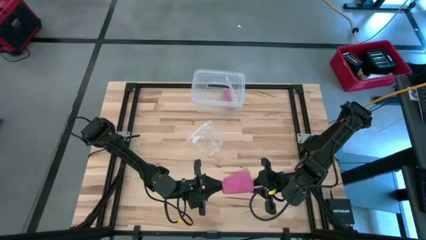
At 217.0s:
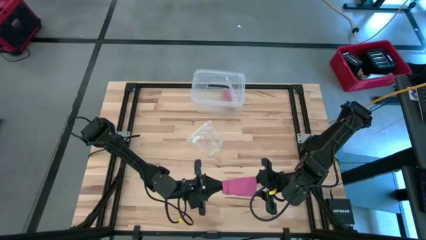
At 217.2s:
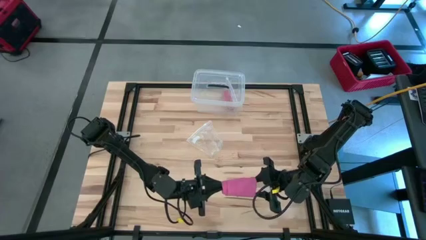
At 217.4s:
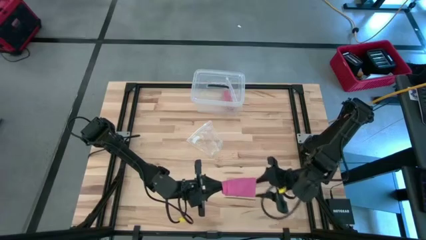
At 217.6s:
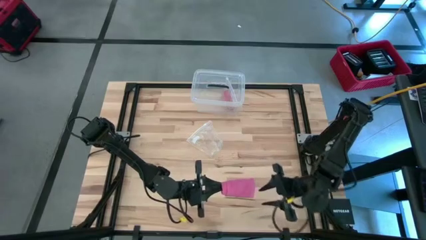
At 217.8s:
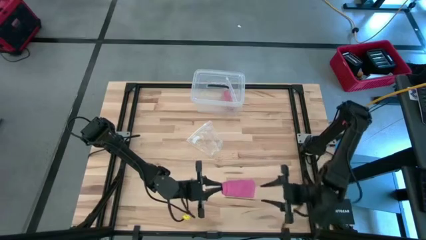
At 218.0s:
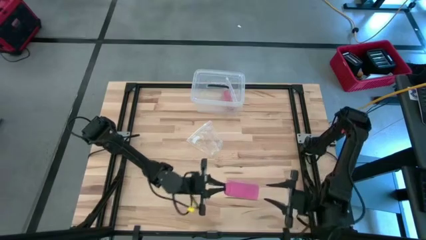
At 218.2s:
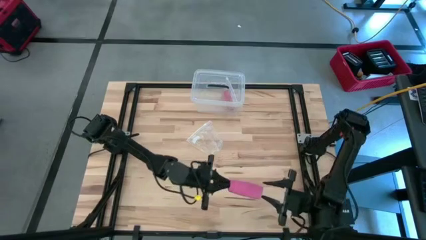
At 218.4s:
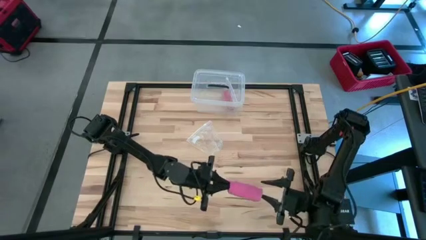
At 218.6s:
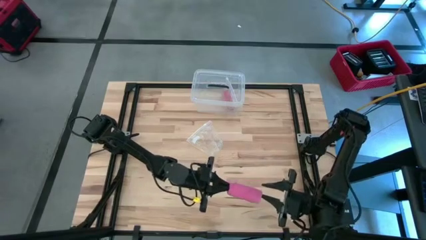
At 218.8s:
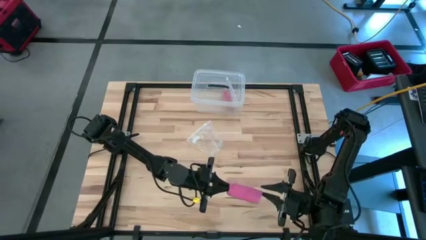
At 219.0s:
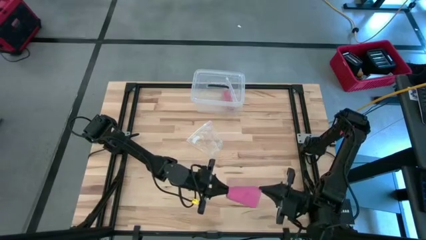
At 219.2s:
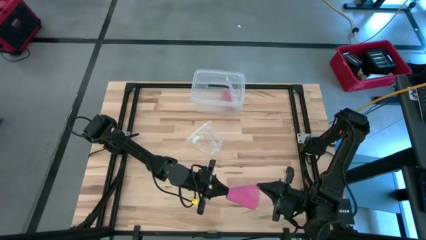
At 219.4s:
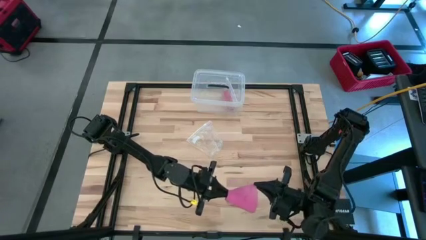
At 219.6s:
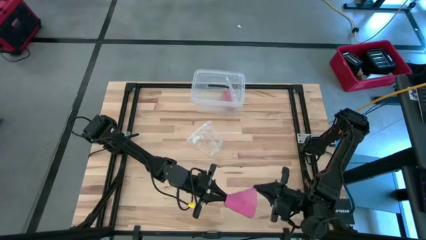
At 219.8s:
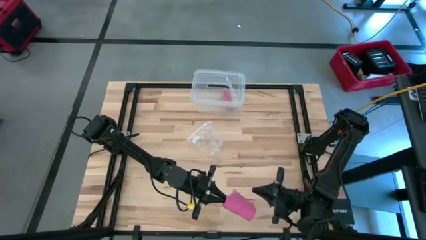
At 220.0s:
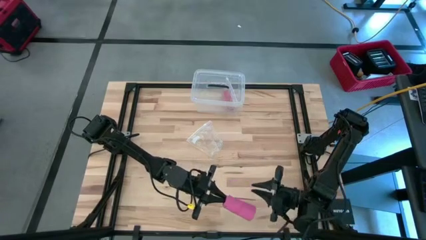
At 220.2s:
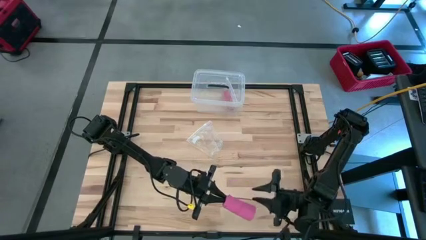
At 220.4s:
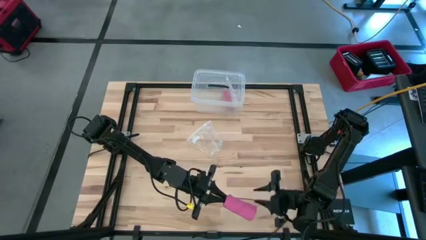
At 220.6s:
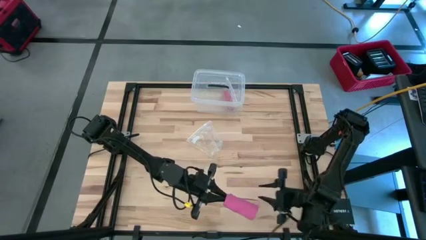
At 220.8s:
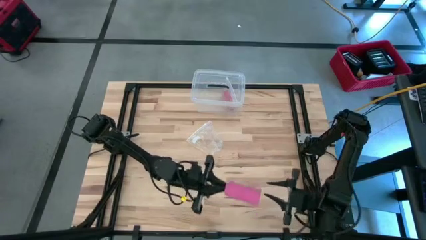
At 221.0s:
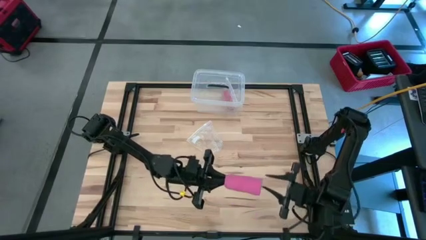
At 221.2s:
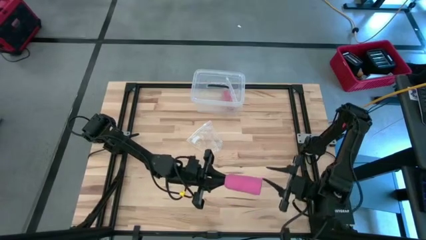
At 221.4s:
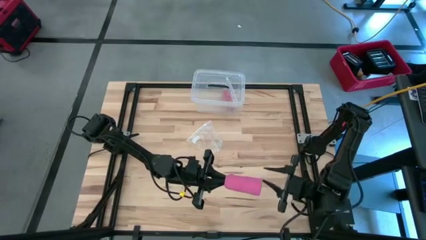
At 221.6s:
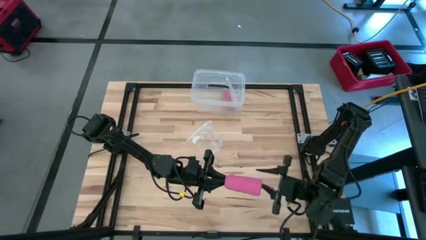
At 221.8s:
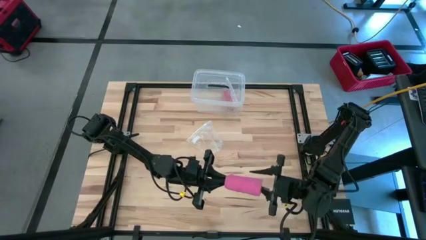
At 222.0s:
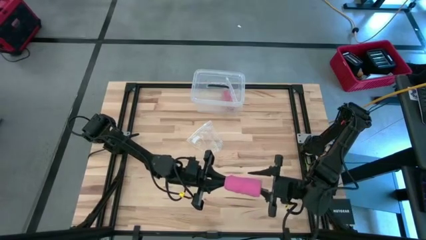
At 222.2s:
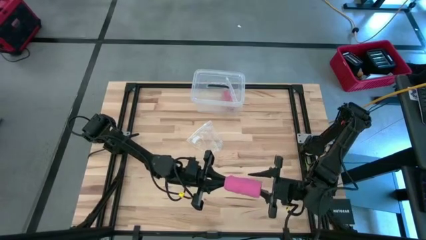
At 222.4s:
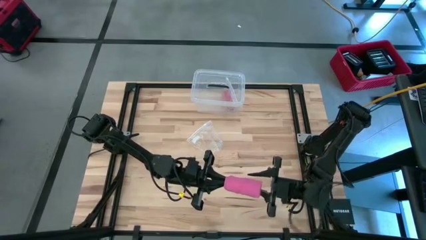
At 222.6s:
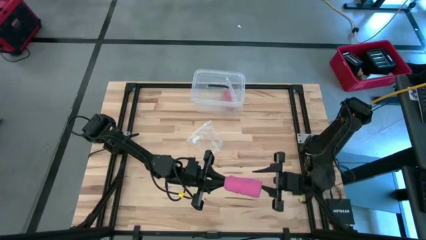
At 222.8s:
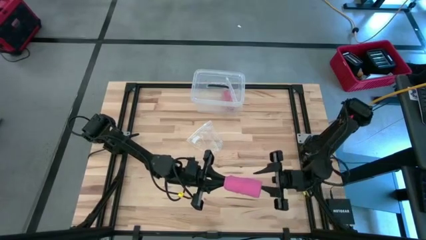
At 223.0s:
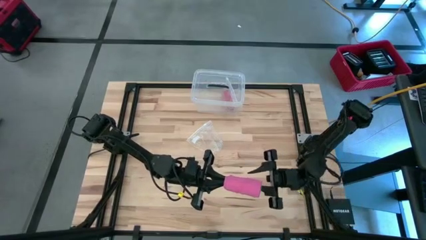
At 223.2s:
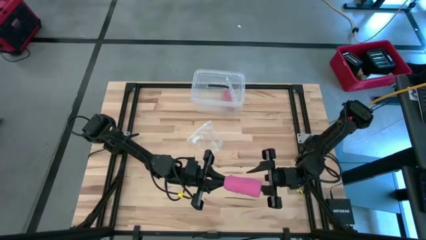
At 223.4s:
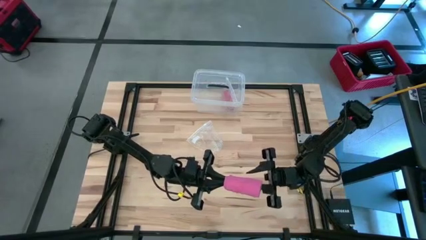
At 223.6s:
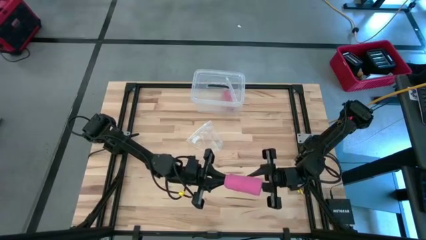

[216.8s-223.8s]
Task: Roll bandage
Roll the pink bandage

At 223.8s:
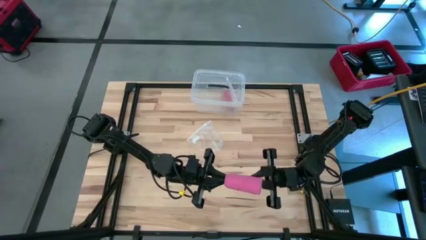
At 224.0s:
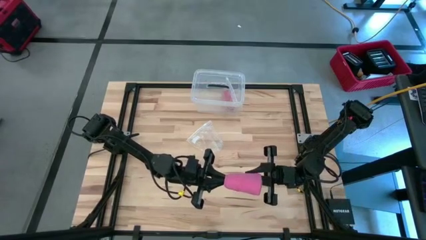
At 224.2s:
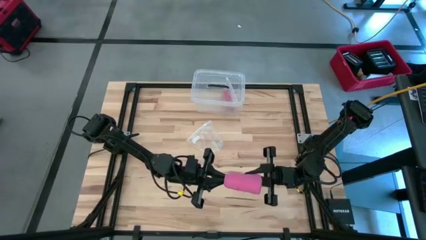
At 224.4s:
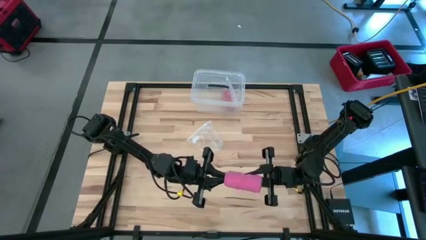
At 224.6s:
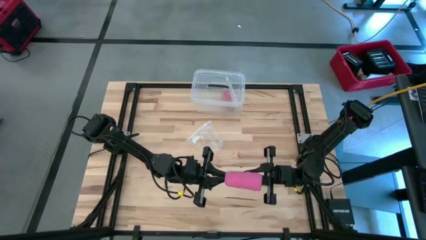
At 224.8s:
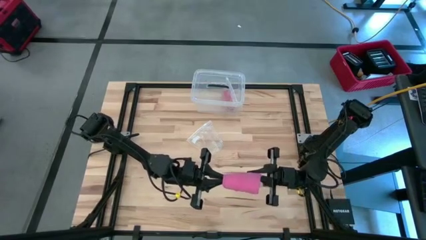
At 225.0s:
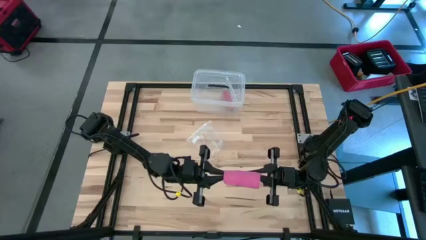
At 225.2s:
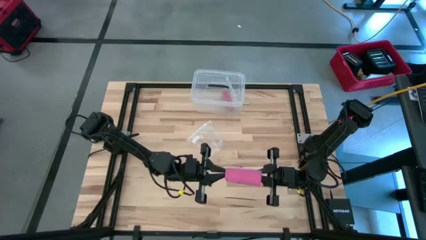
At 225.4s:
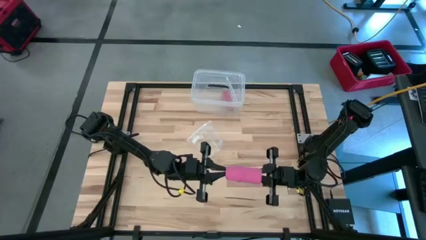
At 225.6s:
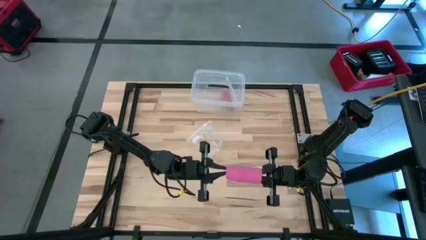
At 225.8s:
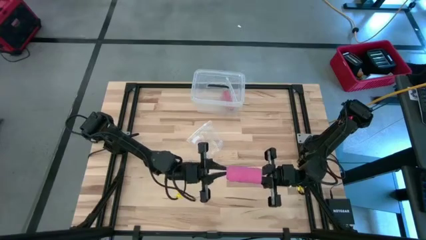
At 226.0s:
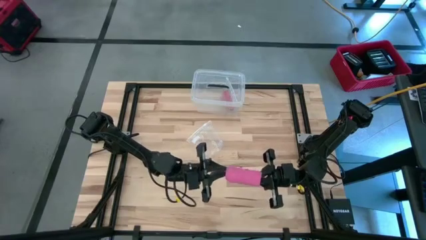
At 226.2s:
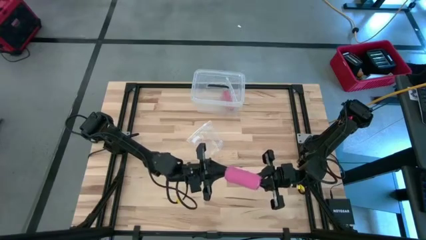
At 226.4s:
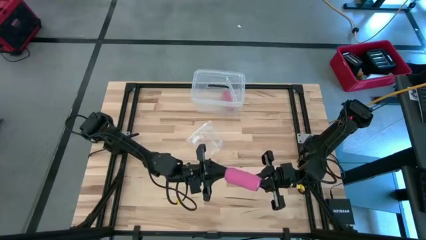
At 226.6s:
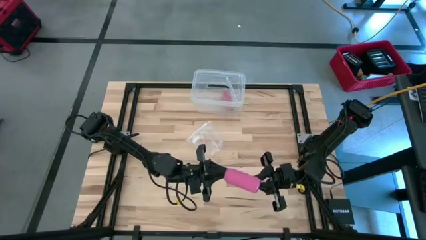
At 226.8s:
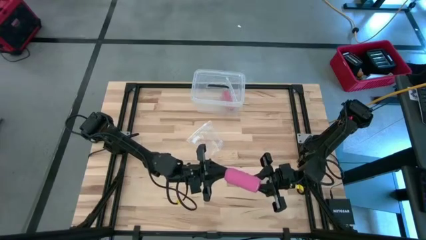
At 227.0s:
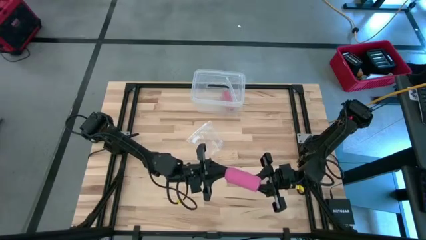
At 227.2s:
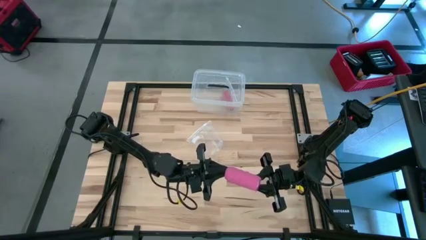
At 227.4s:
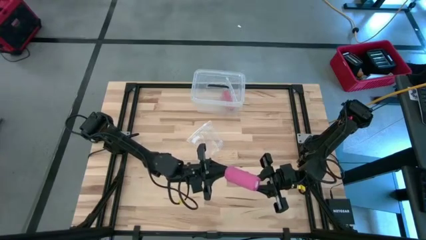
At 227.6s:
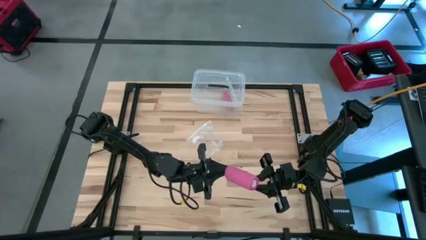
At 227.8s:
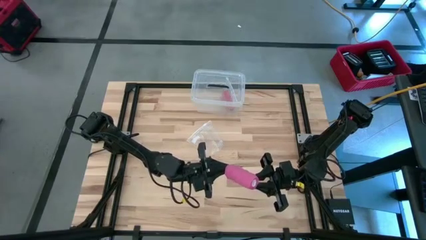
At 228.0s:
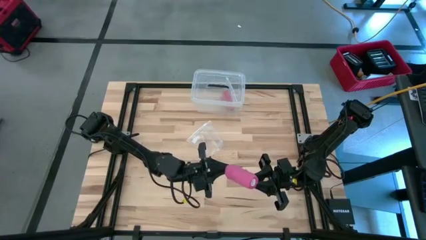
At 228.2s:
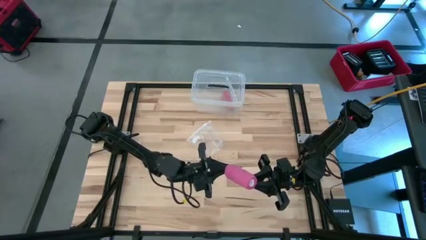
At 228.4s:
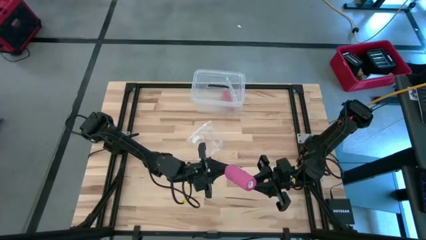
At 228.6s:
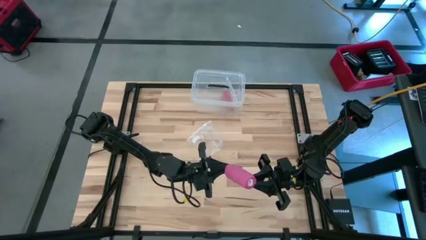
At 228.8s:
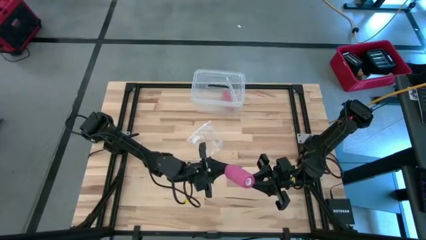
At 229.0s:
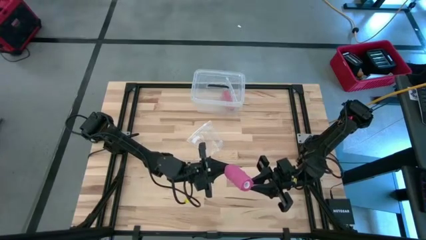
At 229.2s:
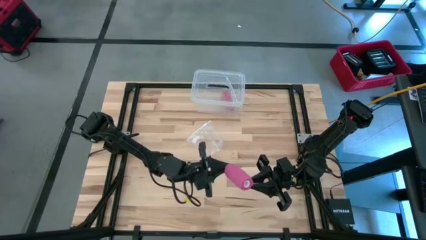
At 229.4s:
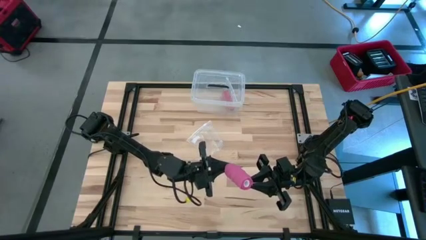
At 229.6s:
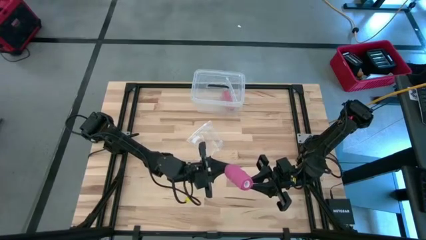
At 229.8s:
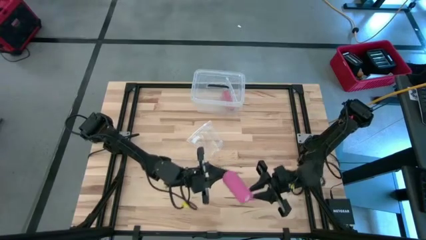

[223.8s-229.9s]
Roll the pink bandage

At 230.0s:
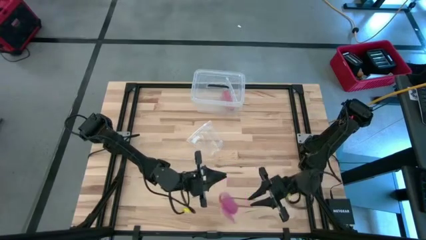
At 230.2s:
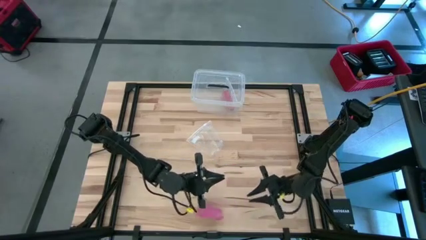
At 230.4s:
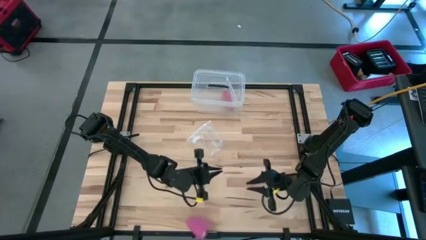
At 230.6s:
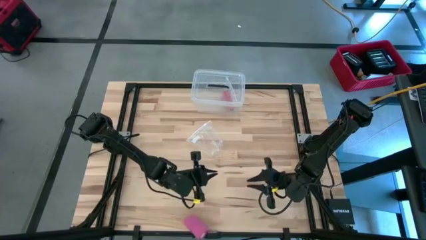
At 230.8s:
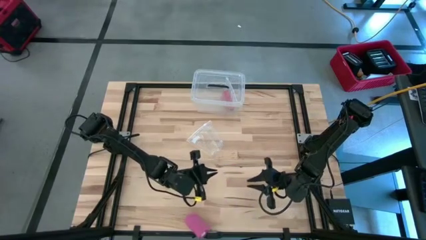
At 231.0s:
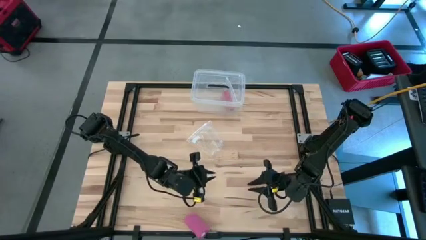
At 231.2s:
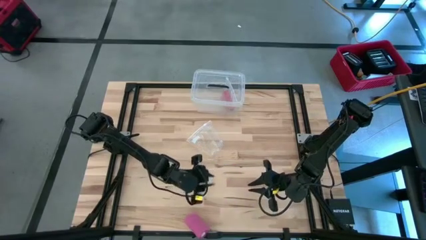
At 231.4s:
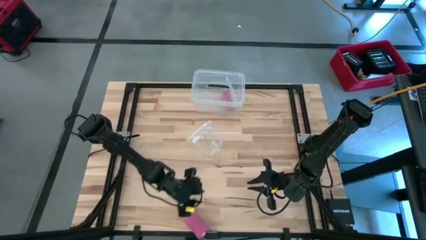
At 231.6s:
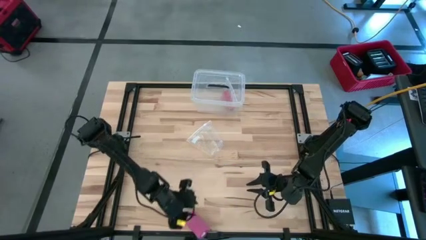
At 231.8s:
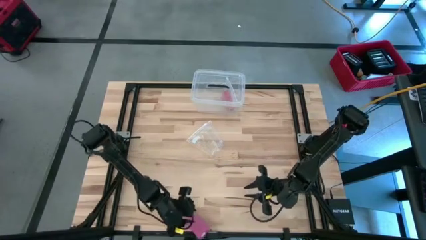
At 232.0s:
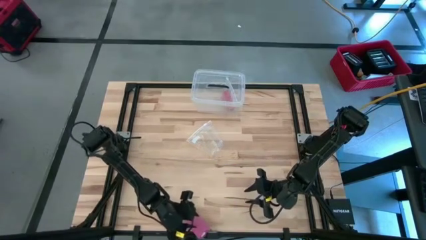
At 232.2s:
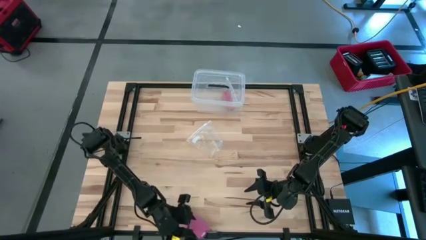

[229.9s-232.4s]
Roll the pink bandage

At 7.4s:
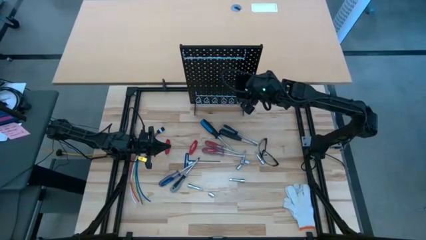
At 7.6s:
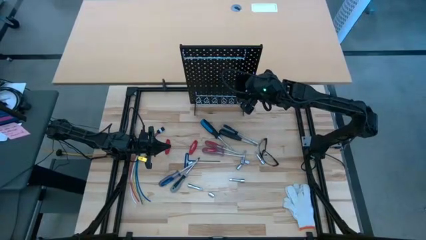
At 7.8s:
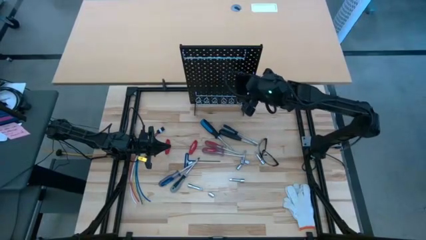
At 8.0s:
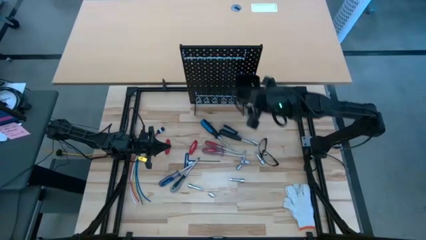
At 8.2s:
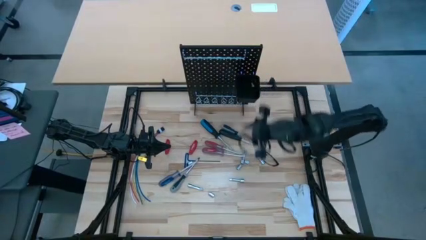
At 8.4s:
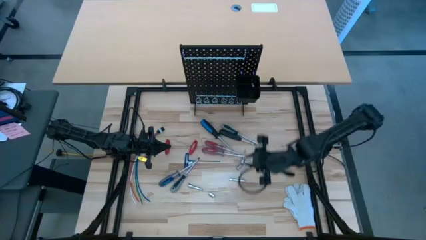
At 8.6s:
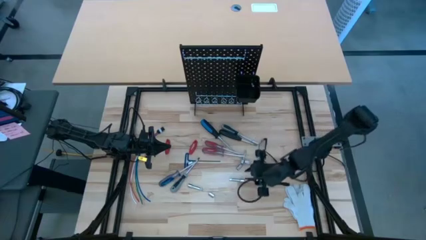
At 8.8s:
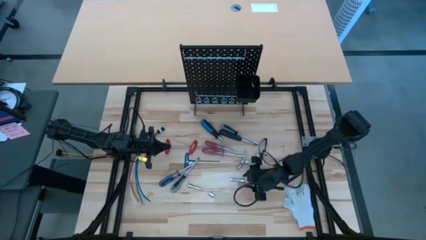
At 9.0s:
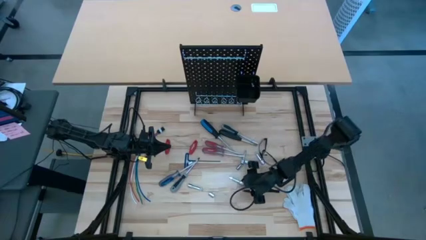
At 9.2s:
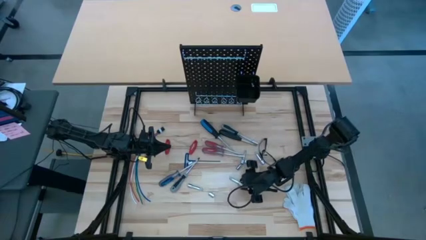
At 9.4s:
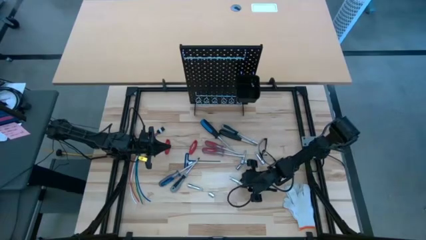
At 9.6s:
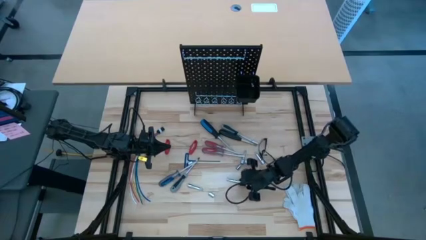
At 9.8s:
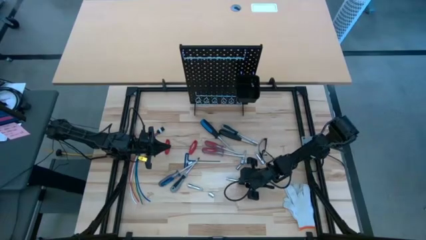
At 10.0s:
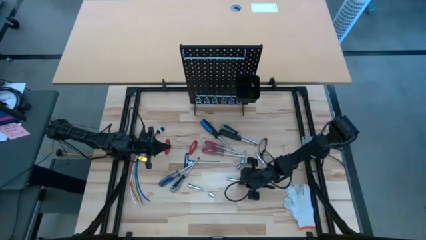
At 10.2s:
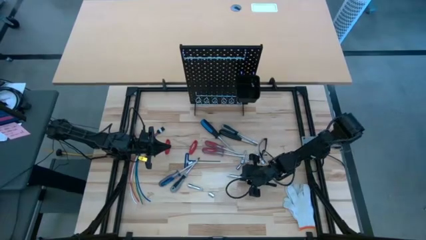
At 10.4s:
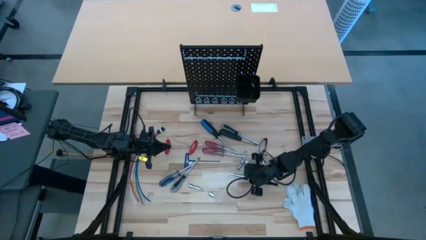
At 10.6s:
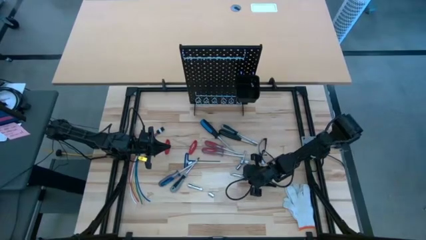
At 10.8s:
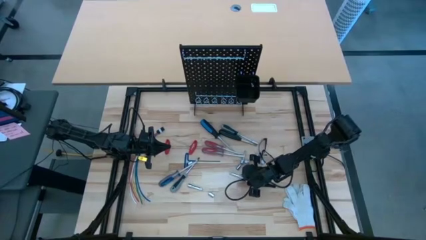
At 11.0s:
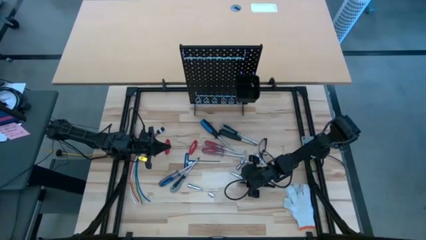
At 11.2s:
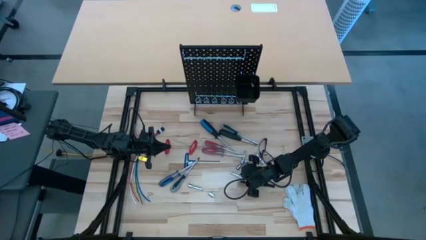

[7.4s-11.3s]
Task: Hang tools onto peg board
Put the extension bar into the bin of the pegboard
